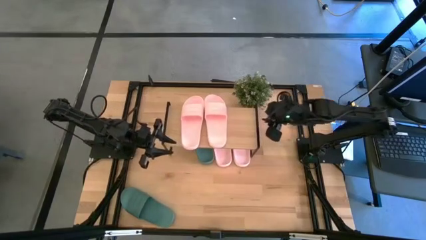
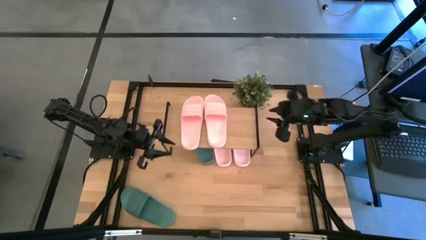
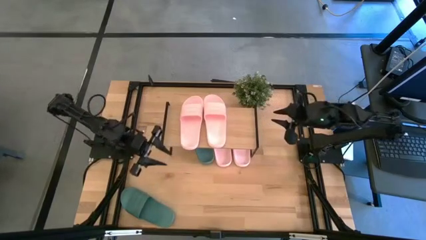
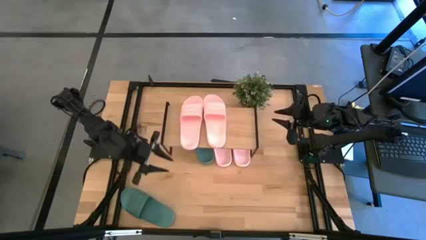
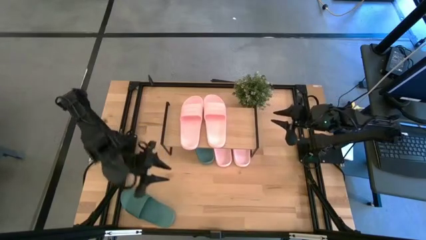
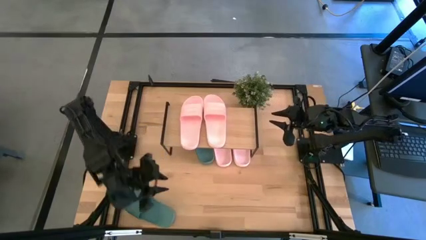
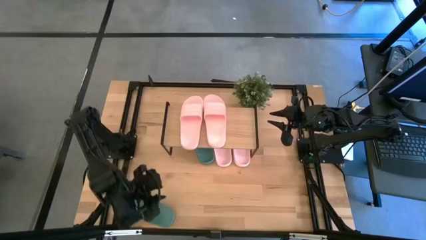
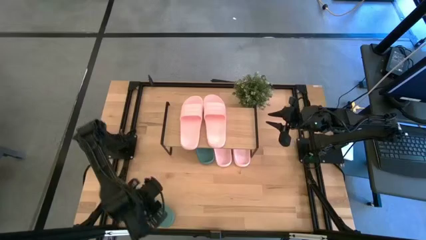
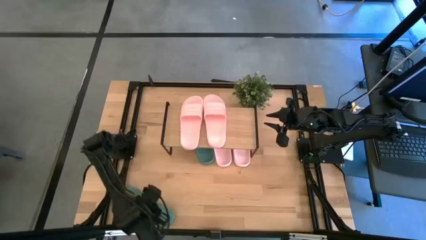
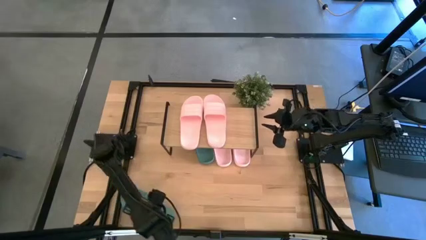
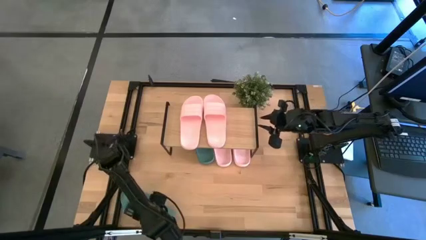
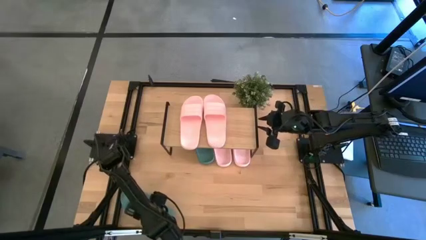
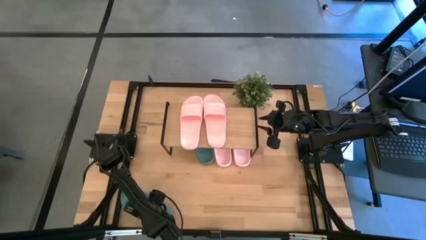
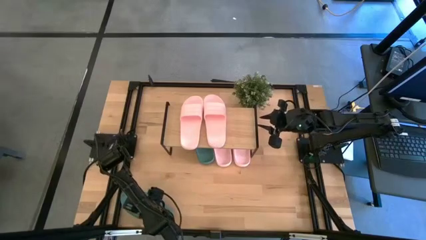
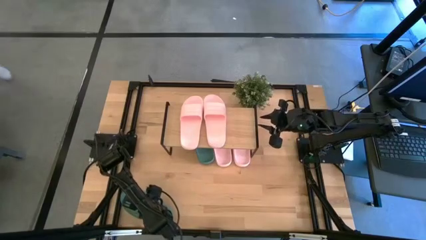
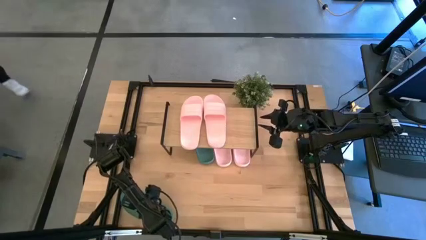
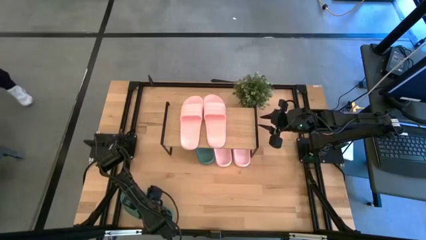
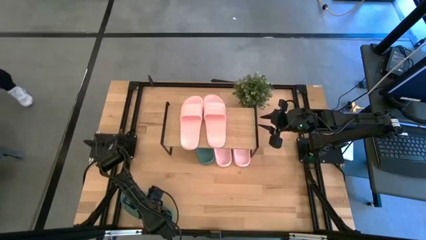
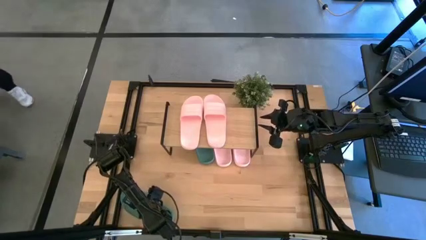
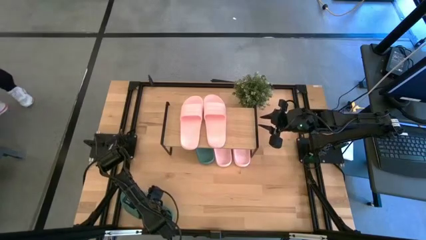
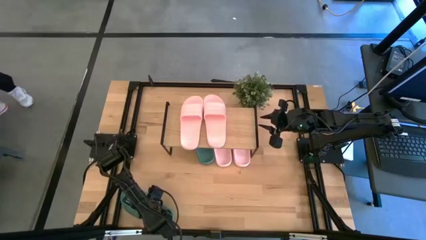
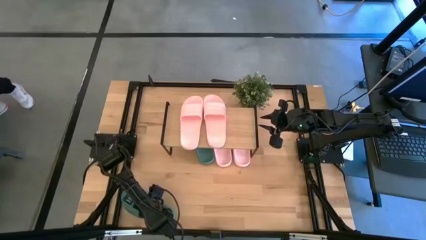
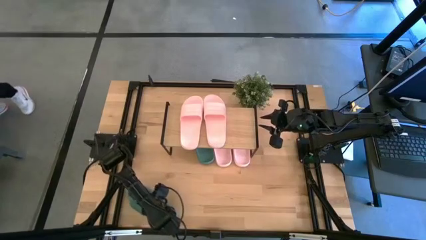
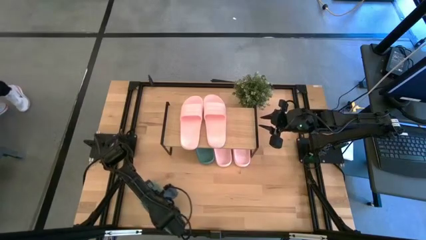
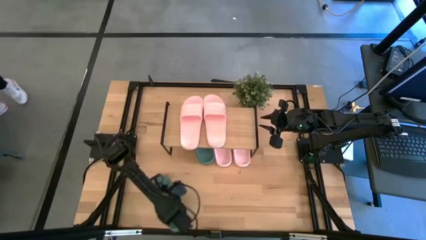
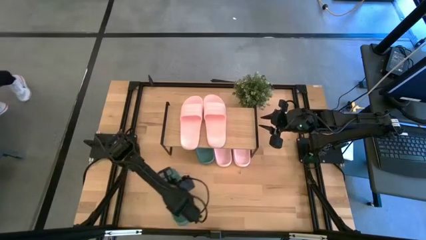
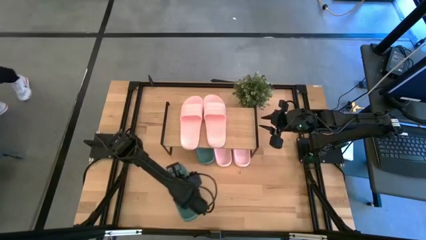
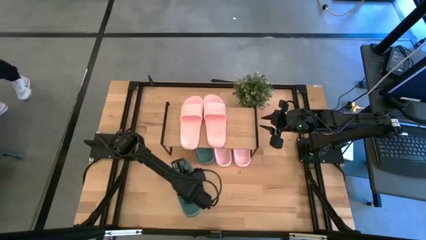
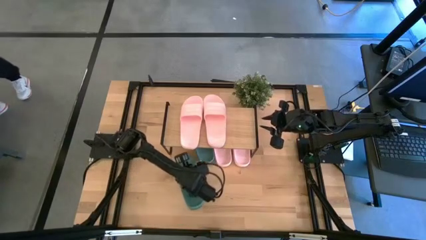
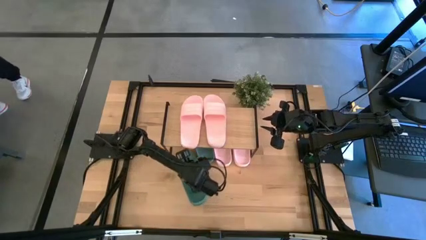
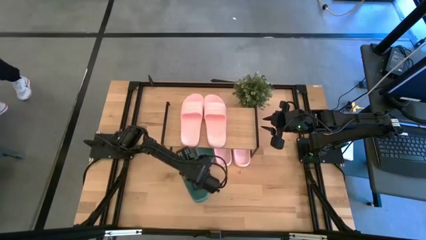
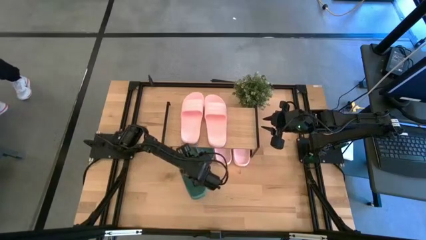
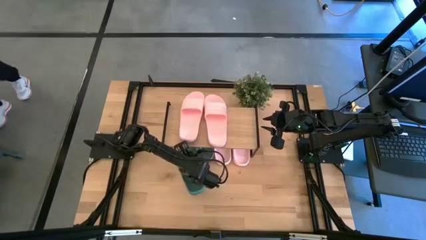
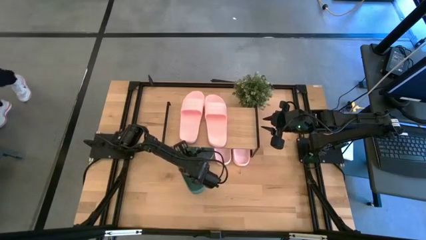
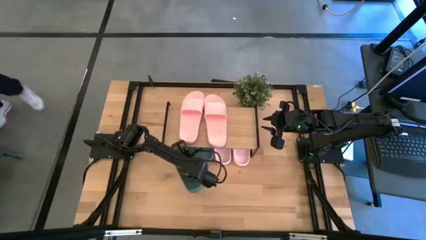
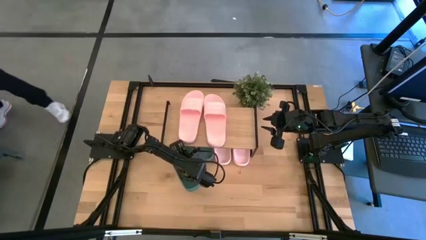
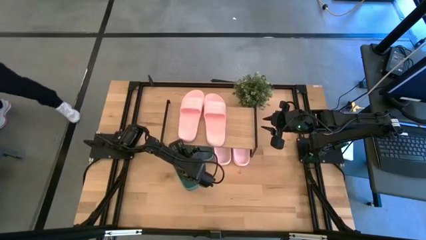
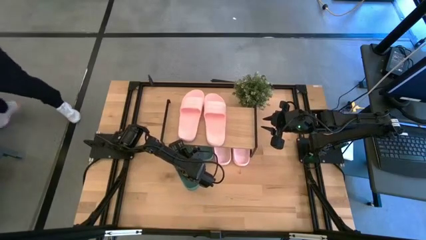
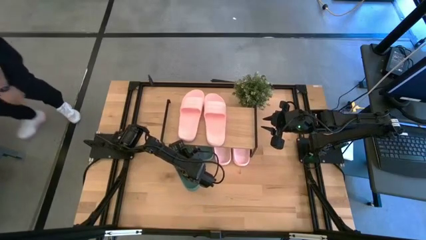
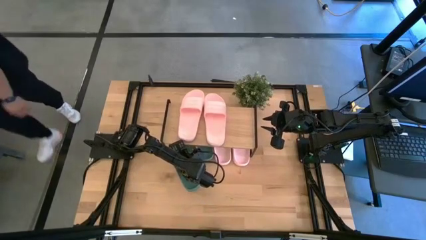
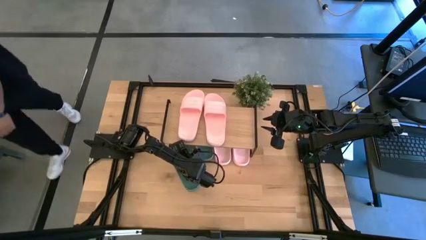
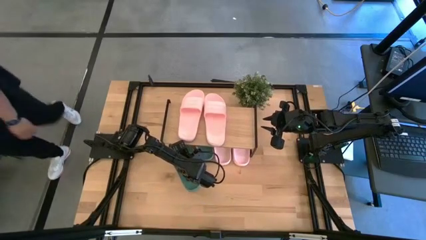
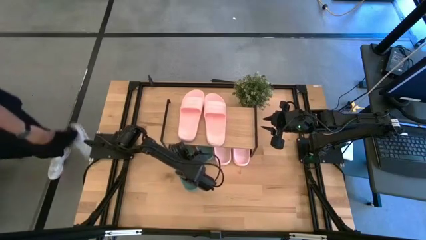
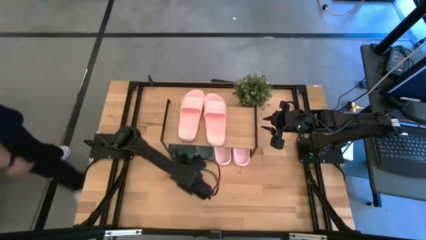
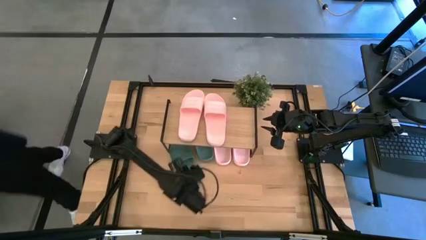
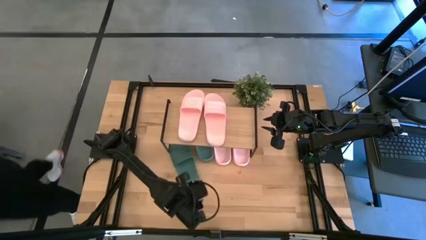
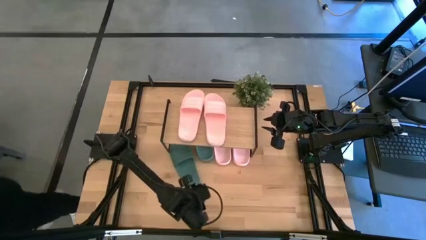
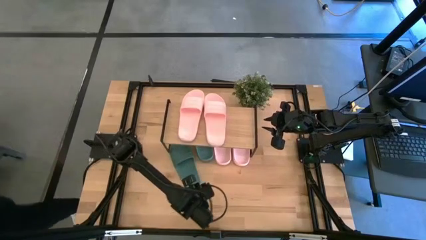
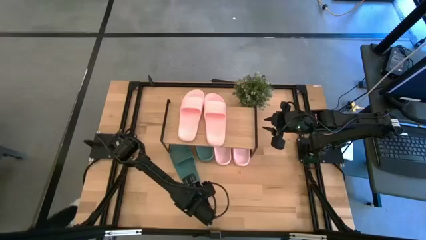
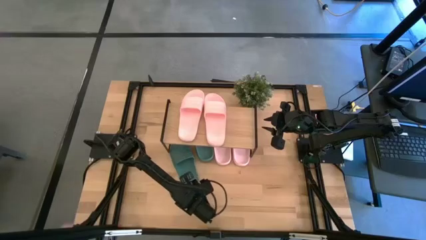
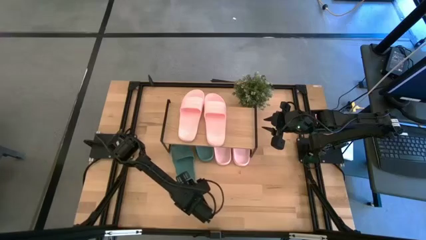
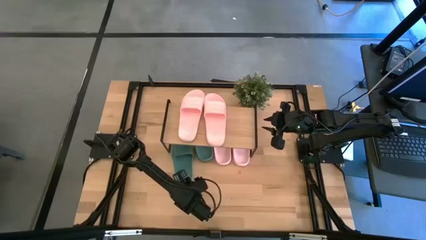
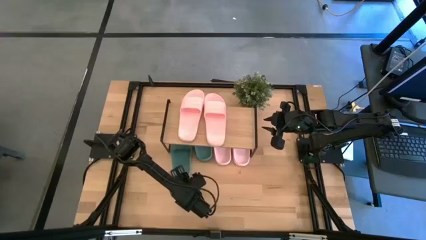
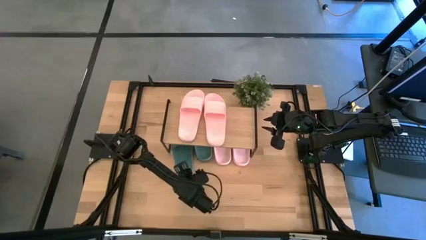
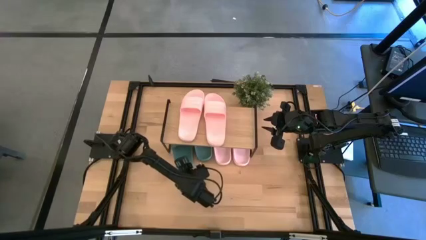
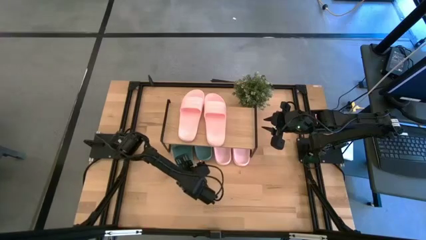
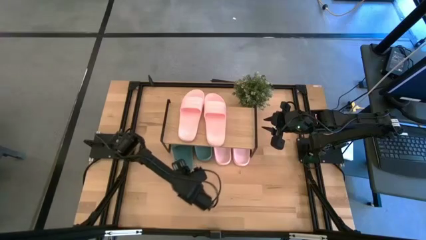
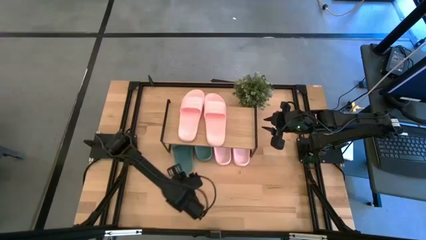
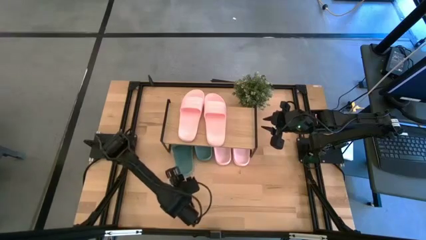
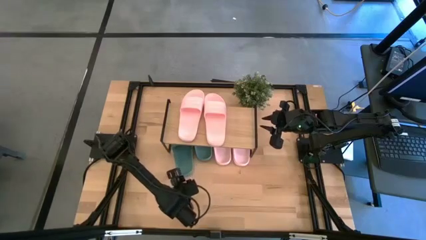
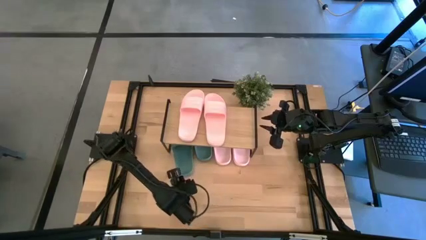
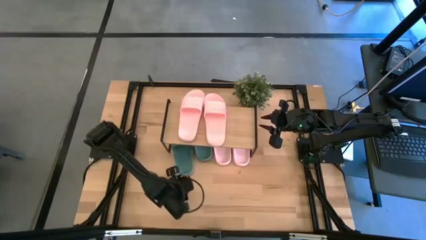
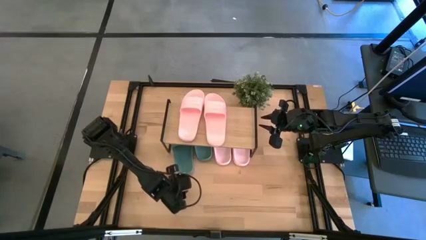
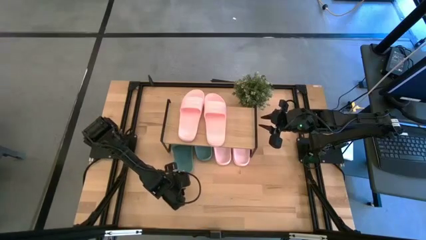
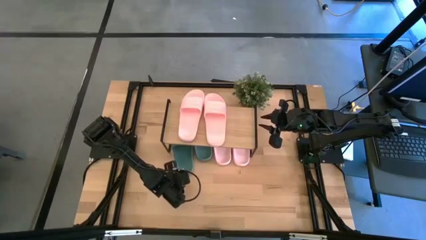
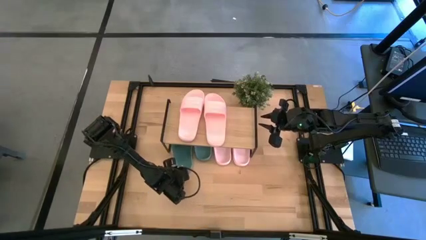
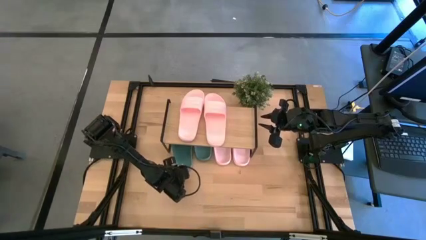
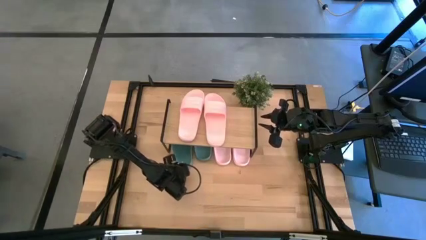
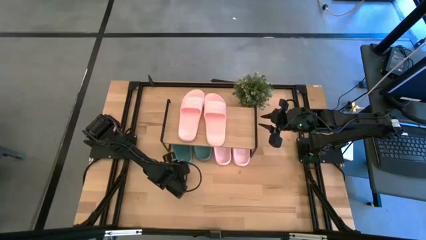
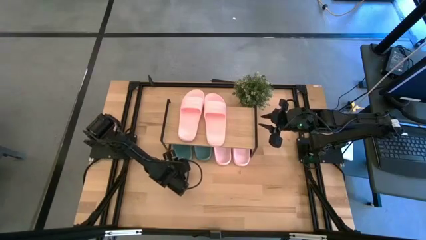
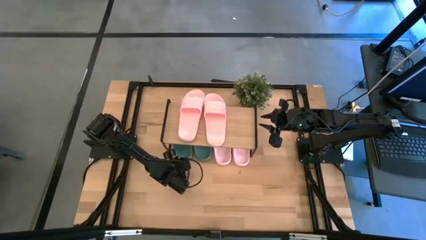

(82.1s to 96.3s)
Task: Pick and place slides into the shelf
Put the green slide under the shelf

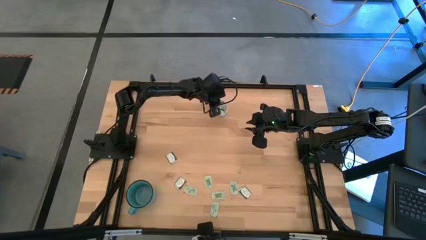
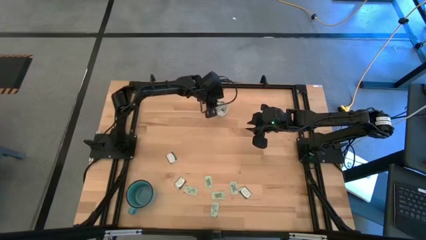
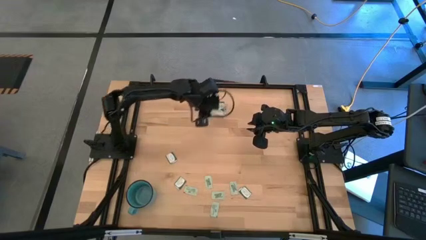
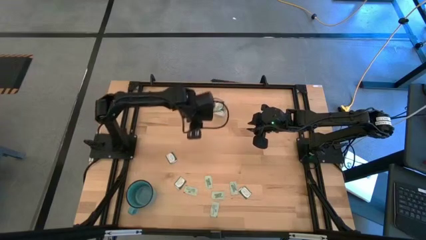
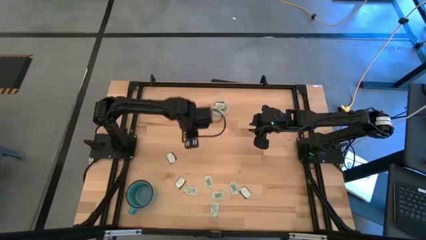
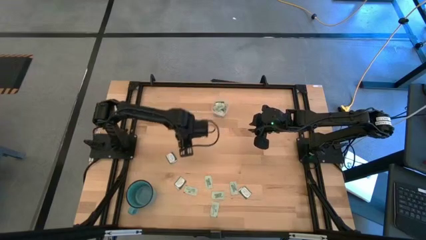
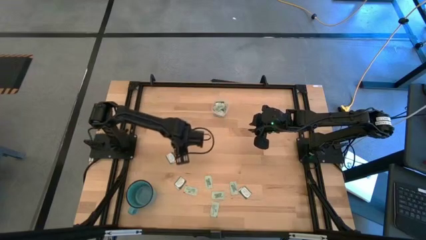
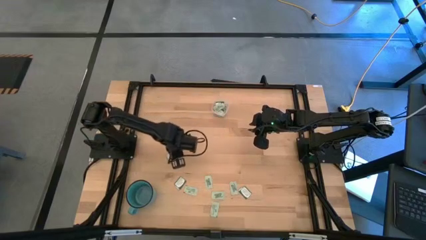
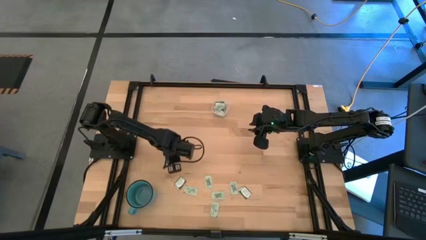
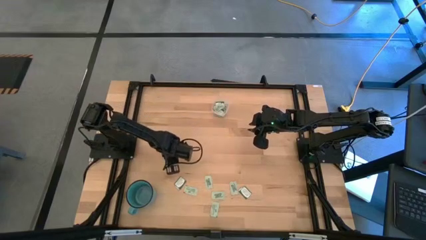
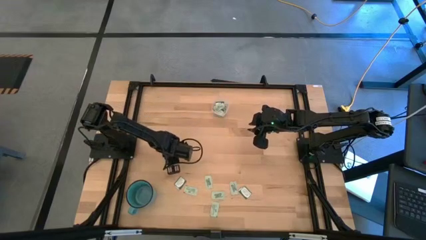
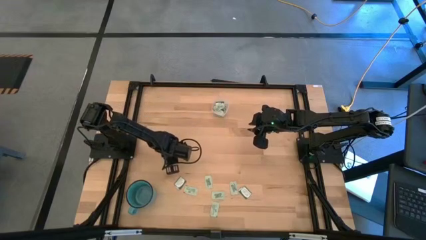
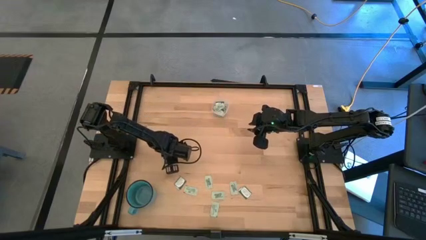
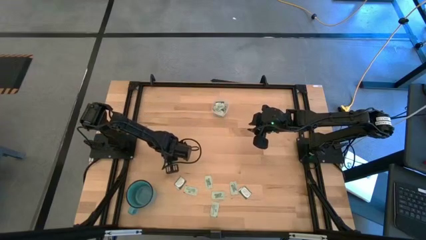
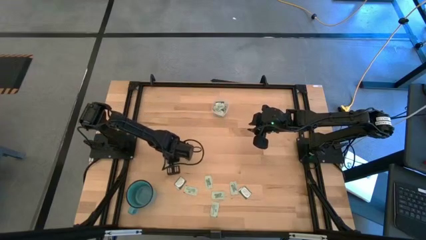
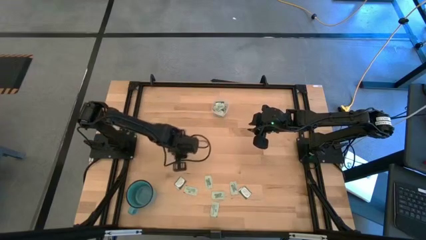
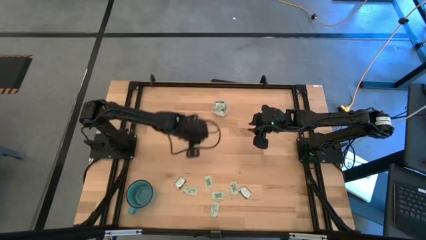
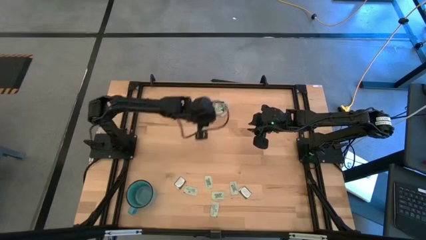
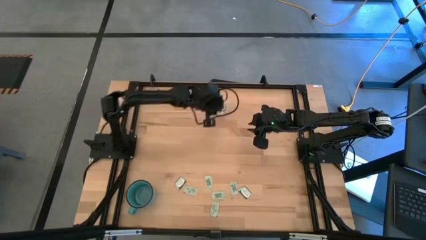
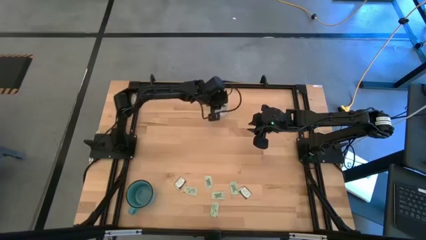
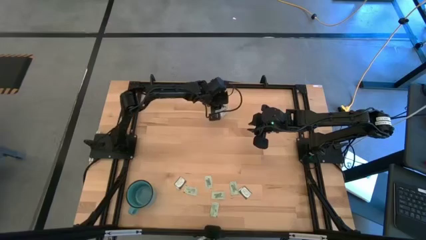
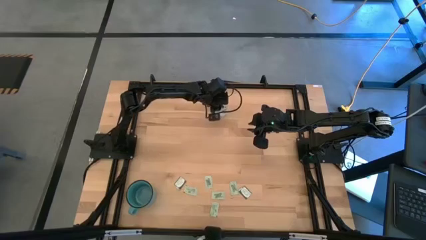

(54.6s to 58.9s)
Task: Pick and place items into bin
Put the green stevia packet into the transparent bin
